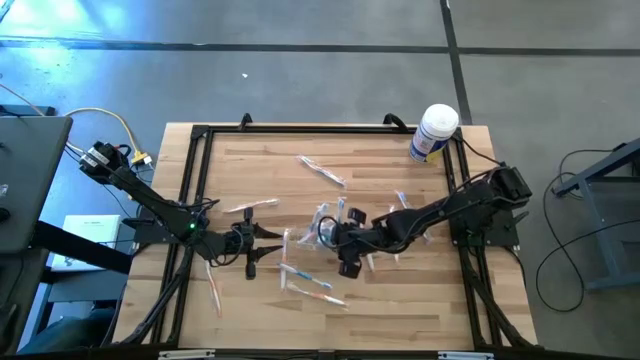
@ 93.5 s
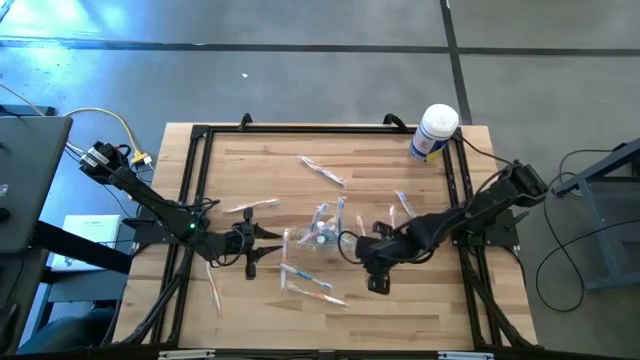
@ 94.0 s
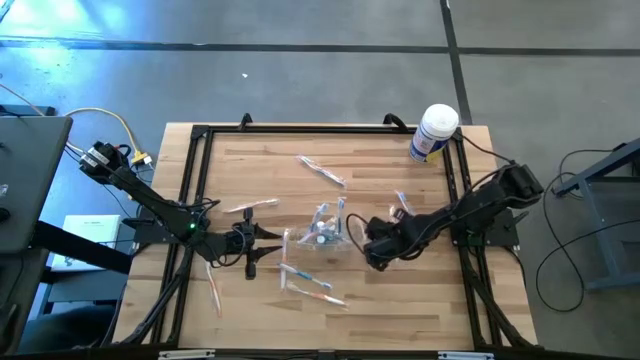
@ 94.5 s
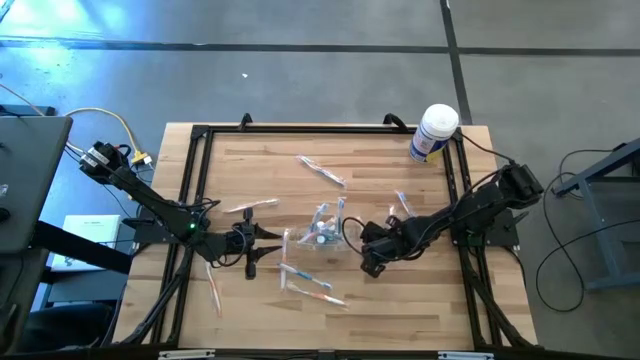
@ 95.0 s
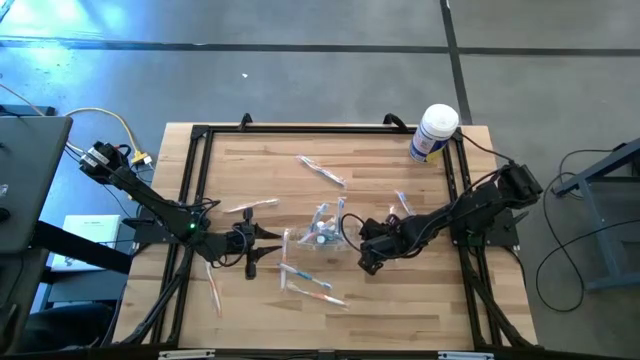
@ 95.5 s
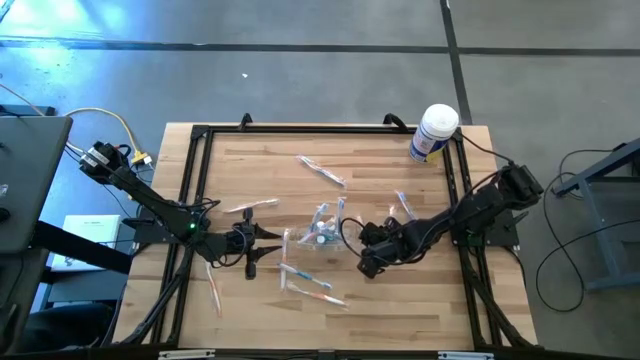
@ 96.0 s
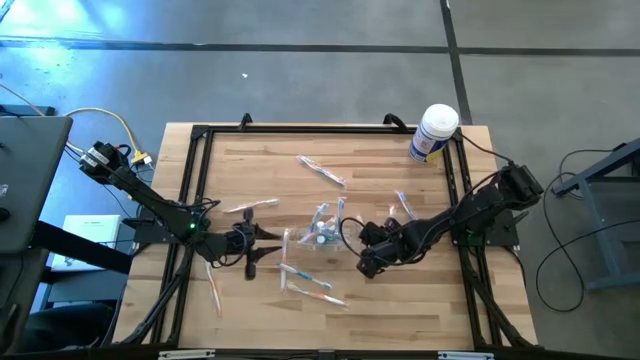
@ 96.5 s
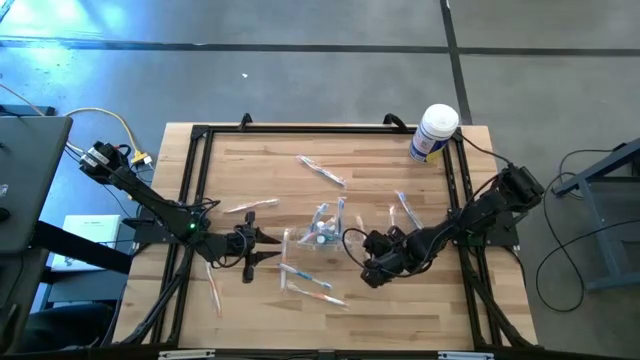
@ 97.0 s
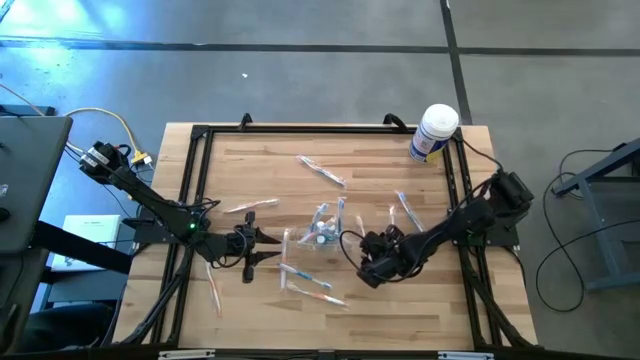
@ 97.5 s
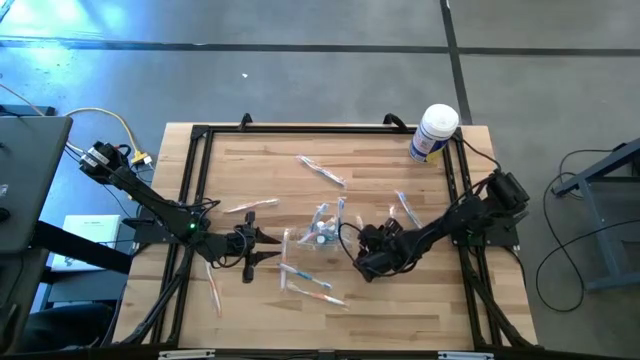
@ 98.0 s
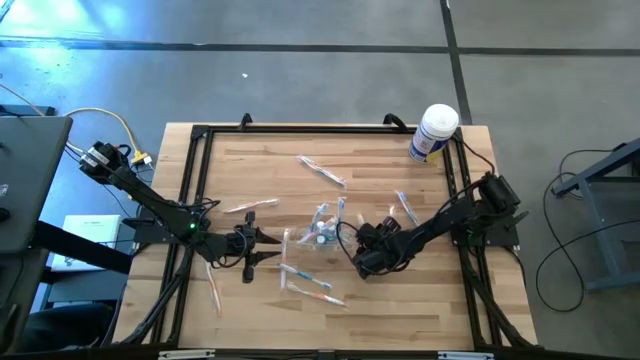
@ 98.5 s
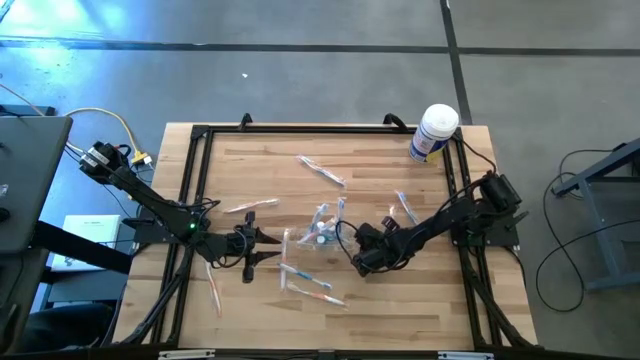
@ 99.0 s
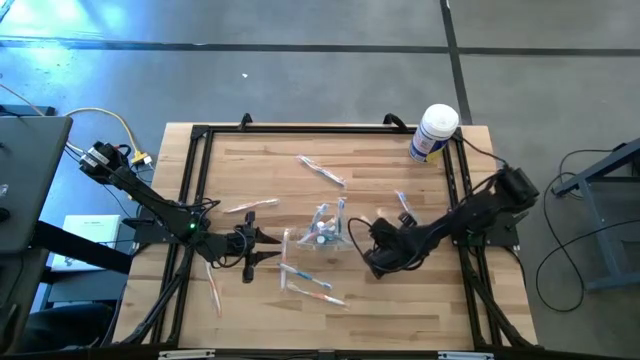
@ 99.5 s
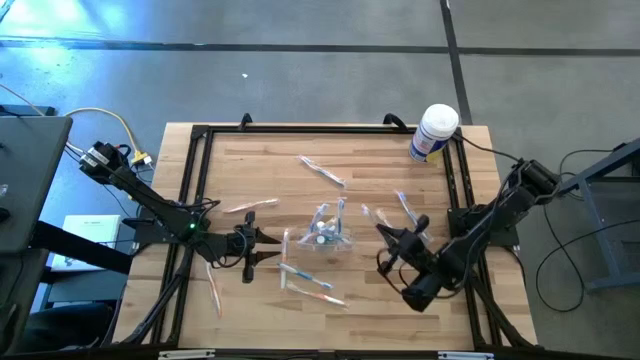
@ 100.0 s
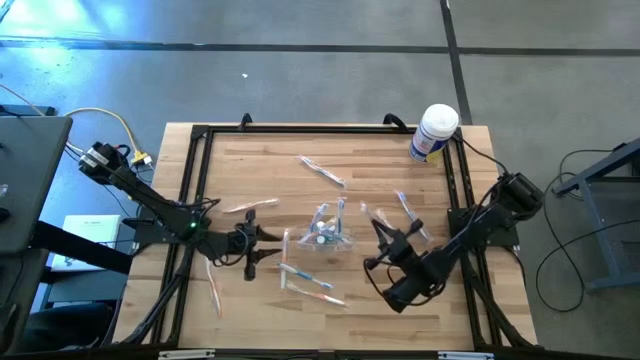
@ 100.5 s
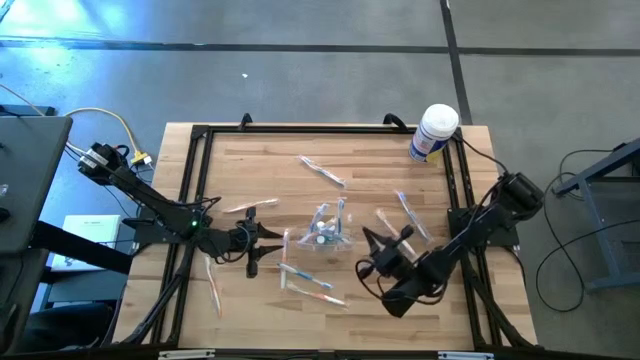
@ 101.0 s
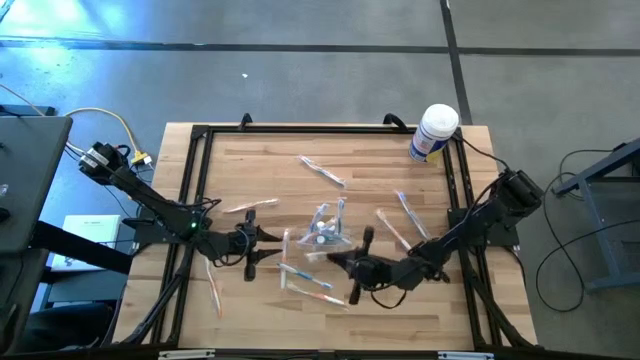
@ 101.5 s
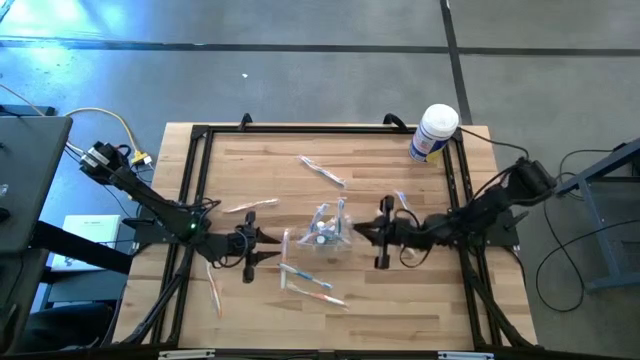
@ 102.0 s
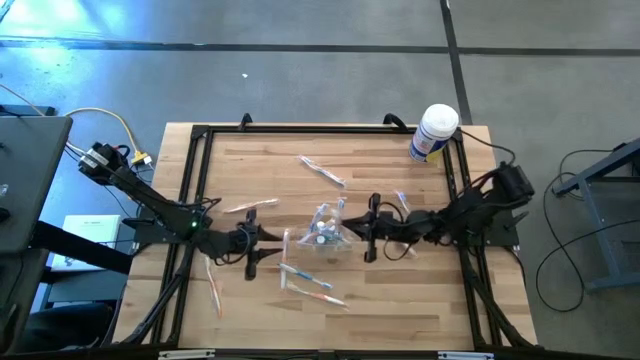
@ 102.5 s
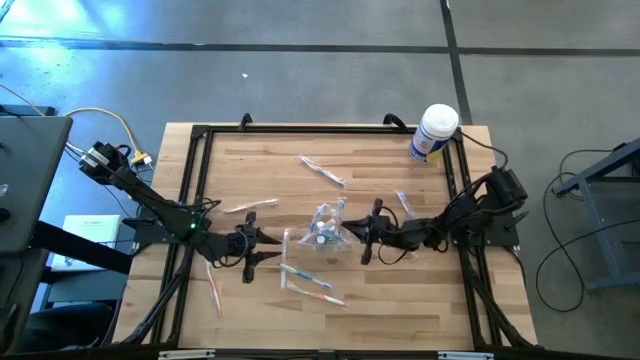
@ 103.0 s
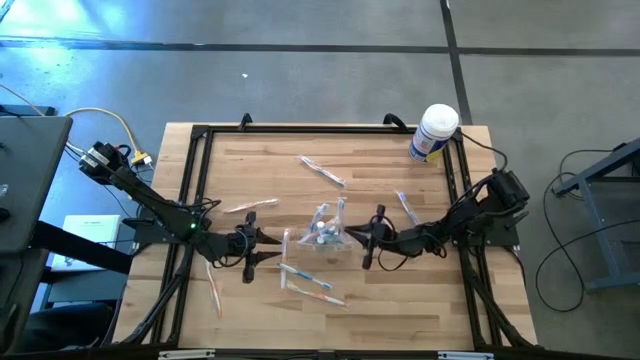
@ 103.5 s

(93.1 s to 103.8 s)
Task: Pick & Place toothbrushing station
Put the orange toothbrush into the transparent organizer

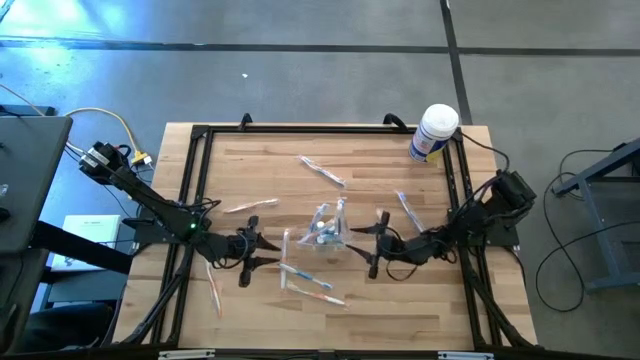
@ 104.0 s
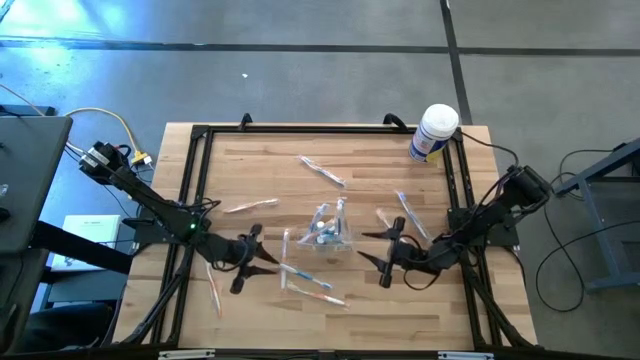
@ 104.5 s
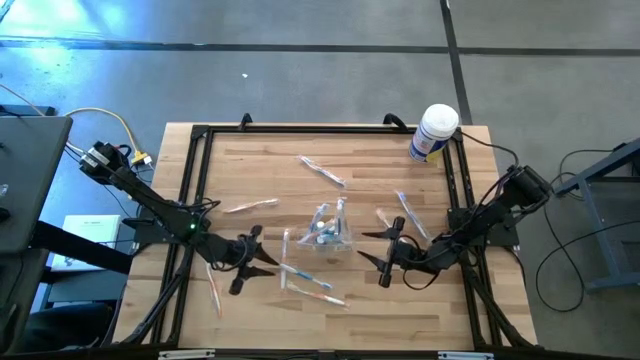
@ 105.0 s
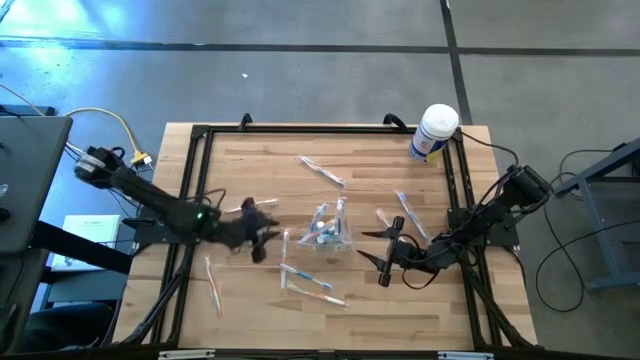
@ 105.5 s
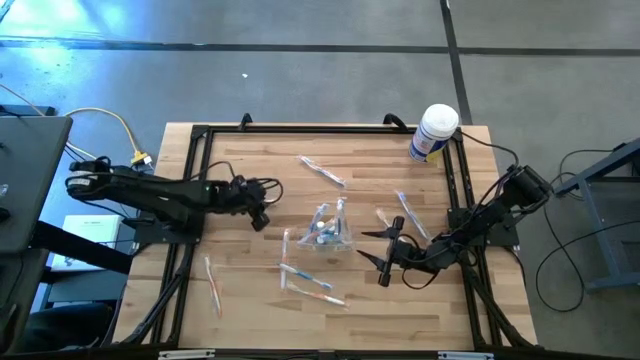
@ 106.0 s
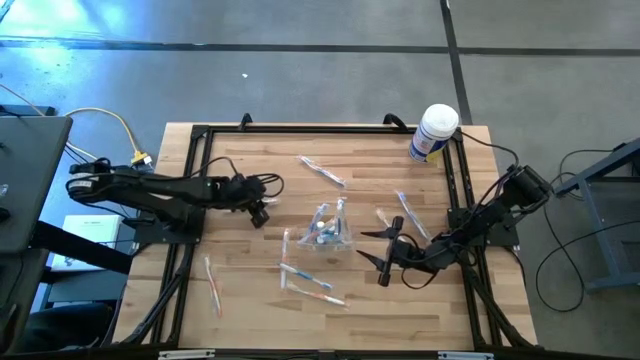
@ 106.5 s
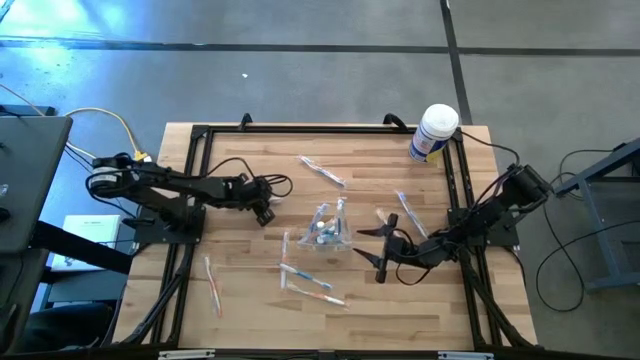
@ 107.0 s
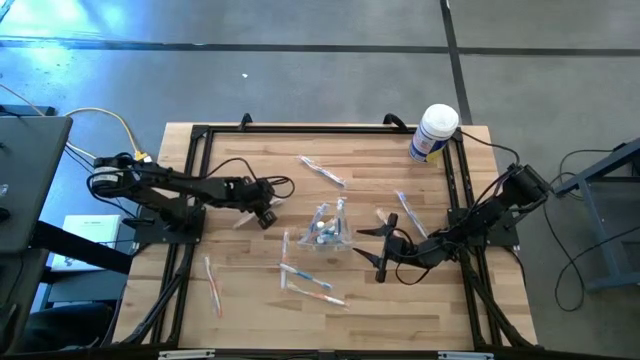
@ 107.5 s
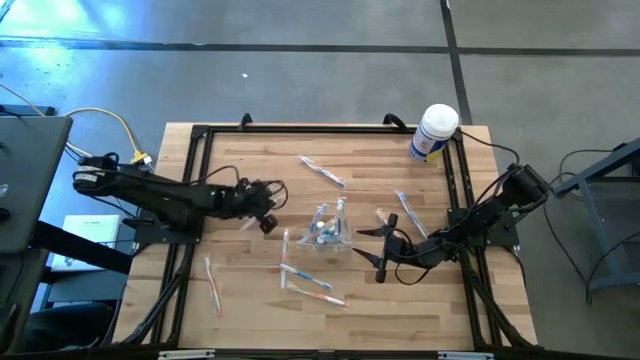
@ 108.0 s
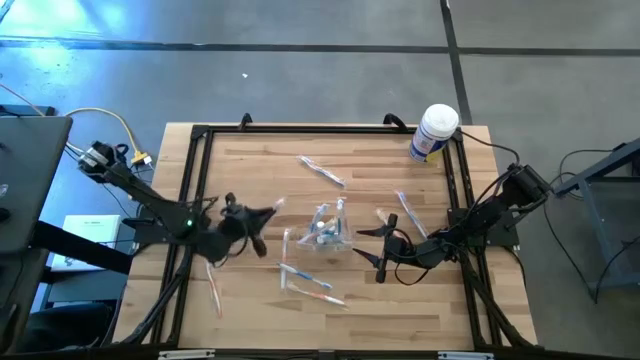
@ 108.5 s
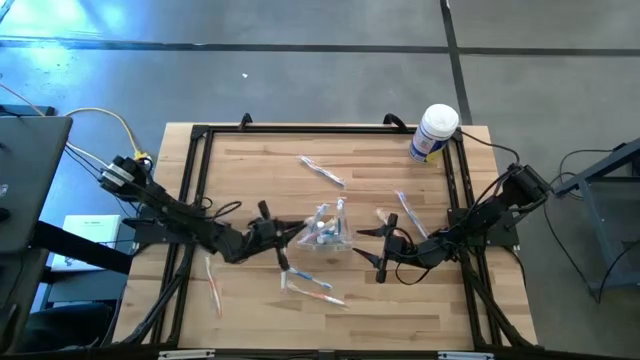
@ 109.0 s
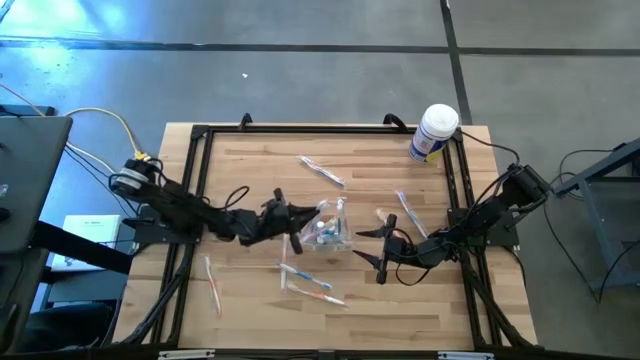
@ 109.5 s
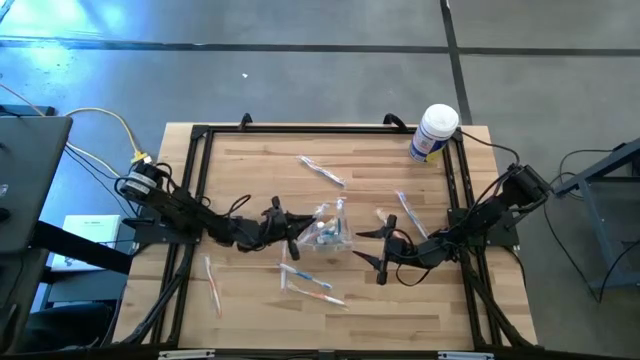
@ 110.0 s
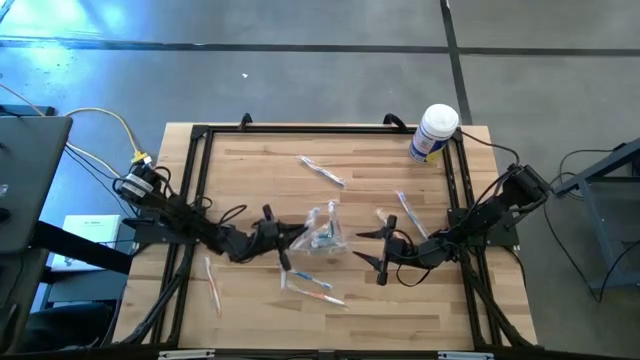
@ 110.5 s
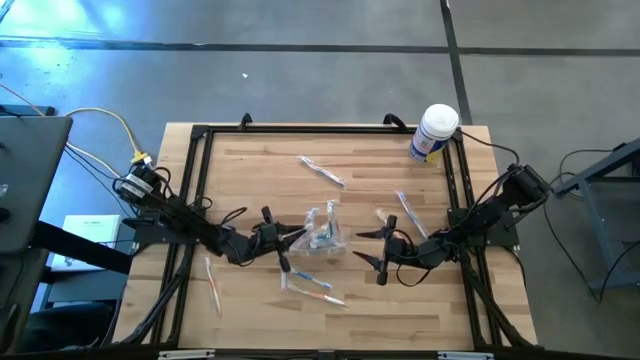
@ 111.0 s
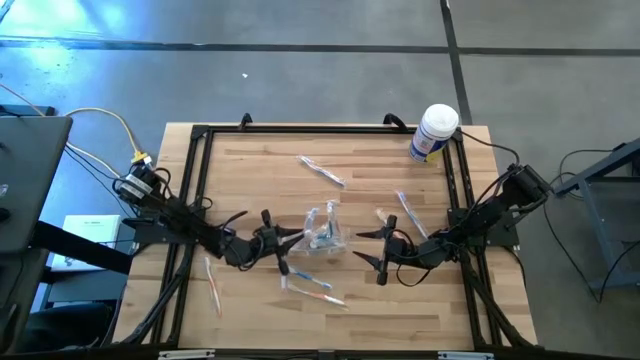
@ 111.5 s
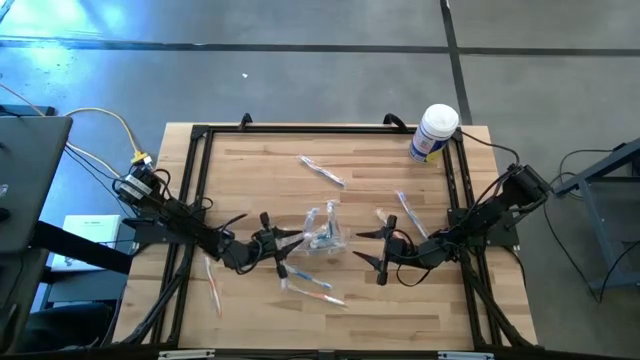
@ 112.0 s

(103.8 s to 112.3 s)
Put the orange toothbrush into the transparent organizer

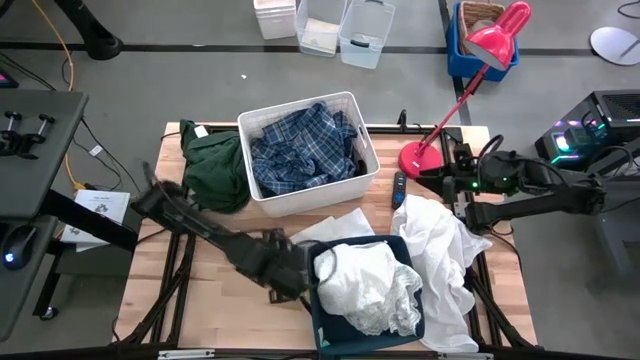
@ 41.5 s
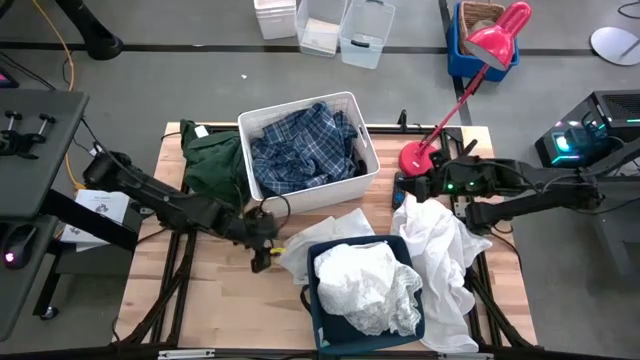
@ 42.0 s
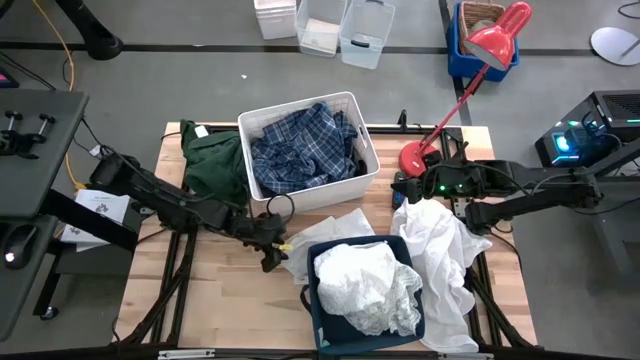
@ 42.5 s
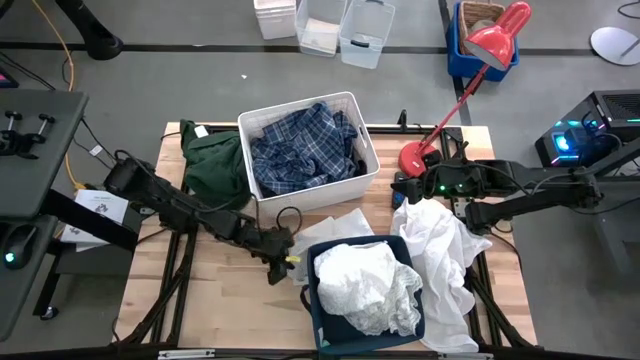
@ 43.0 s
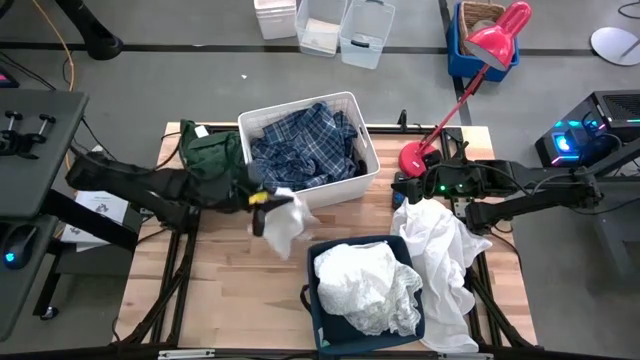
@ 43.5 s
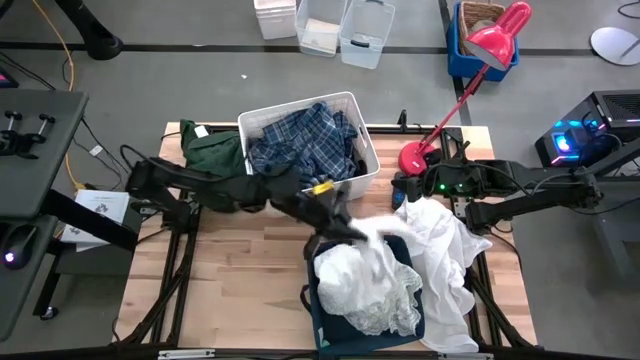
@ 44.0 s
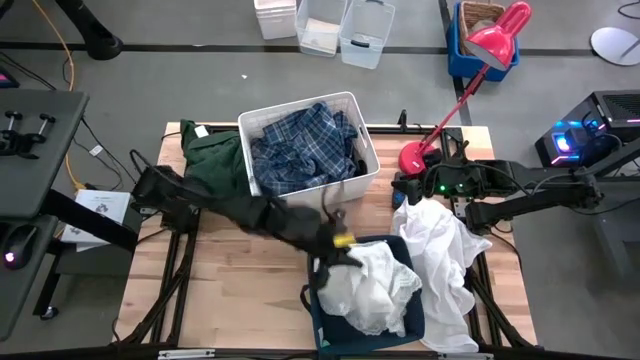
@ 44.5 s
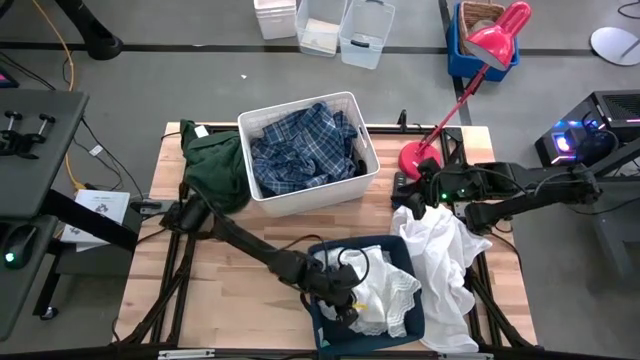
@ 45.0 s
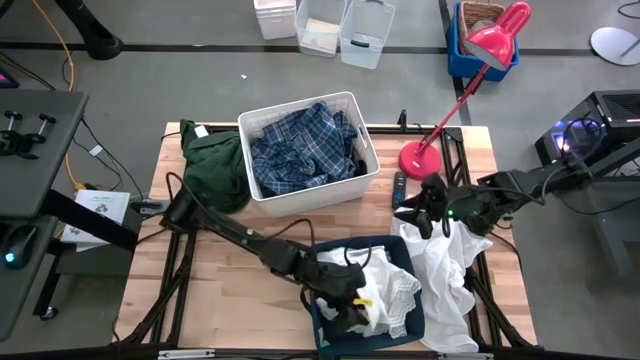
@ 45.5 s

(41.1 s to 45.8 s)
Task: Sort clothes
Put the white shorts into the blue laundry bin
